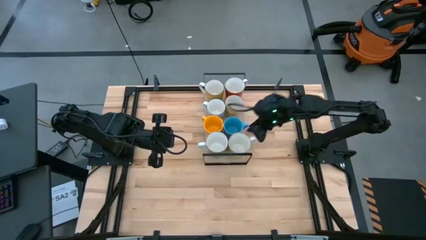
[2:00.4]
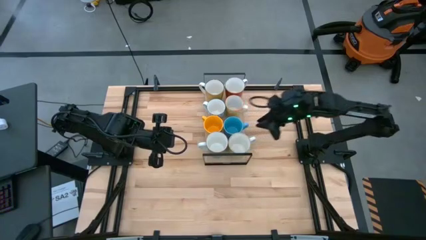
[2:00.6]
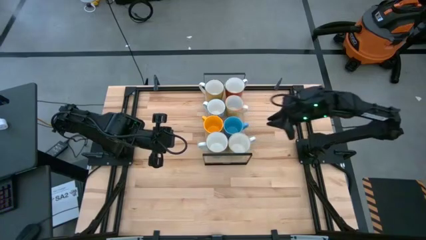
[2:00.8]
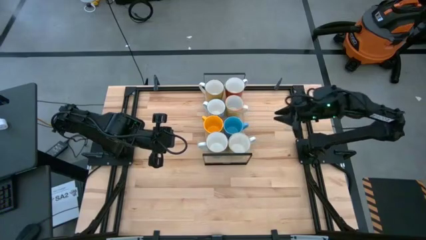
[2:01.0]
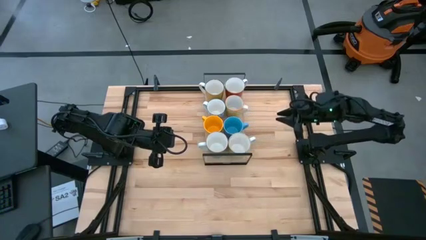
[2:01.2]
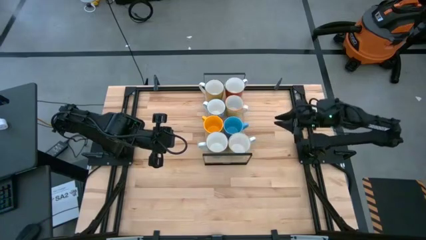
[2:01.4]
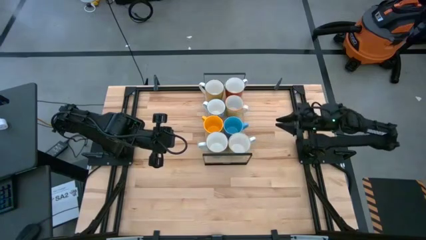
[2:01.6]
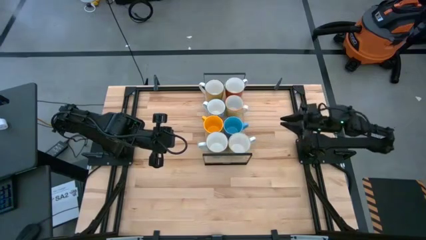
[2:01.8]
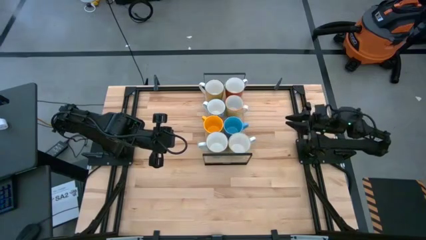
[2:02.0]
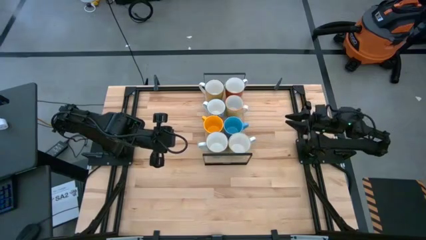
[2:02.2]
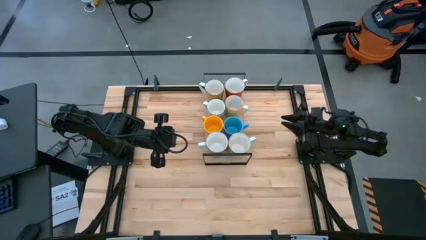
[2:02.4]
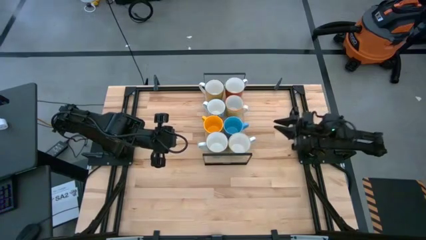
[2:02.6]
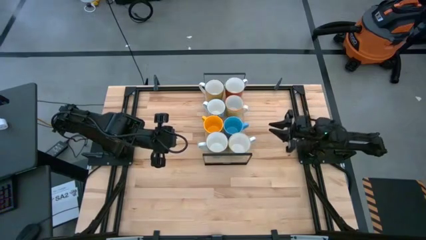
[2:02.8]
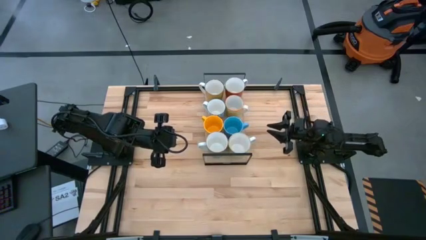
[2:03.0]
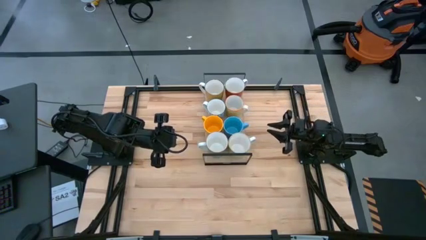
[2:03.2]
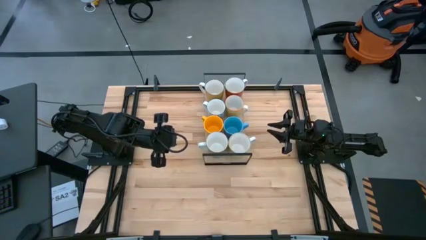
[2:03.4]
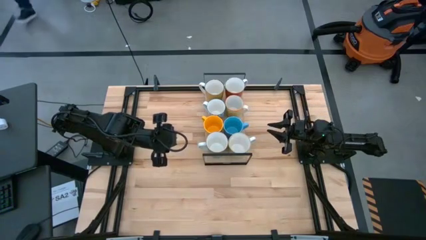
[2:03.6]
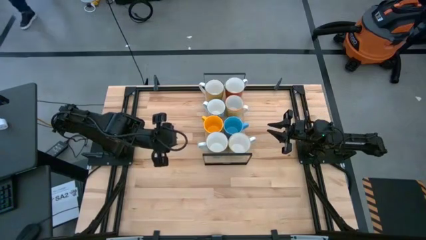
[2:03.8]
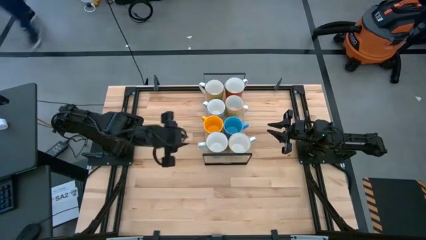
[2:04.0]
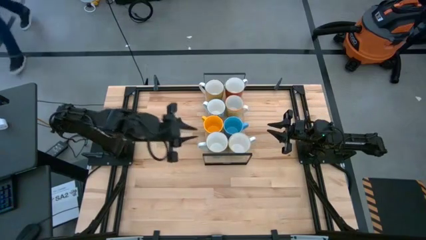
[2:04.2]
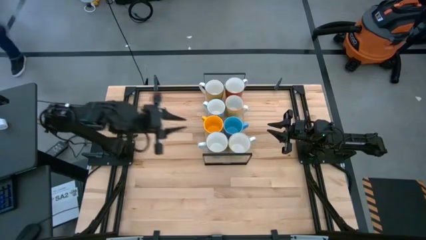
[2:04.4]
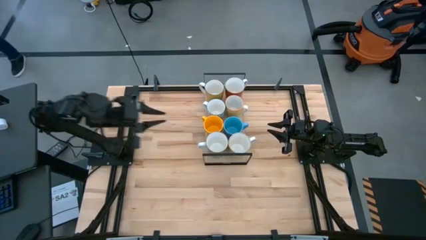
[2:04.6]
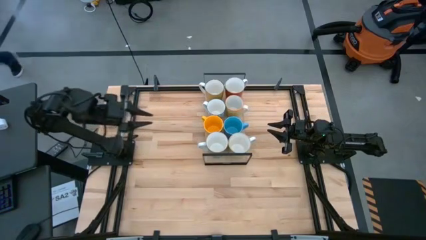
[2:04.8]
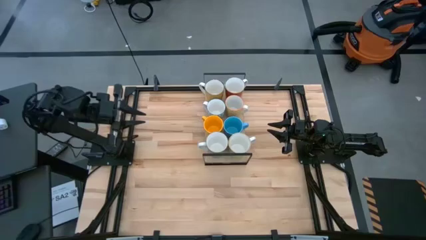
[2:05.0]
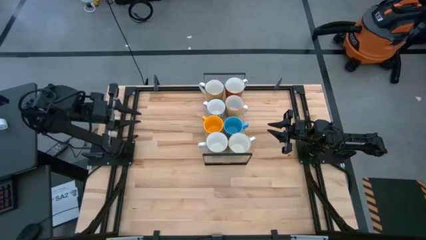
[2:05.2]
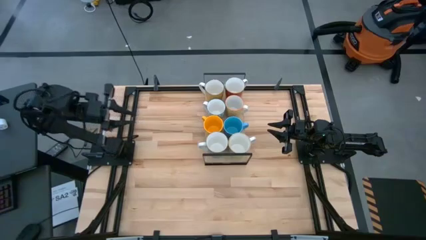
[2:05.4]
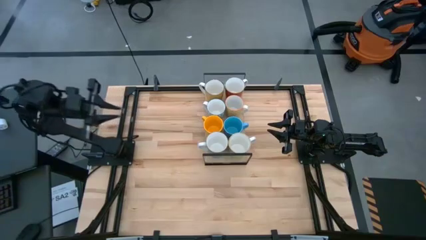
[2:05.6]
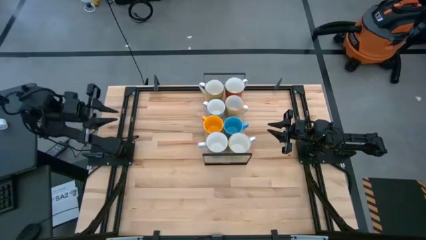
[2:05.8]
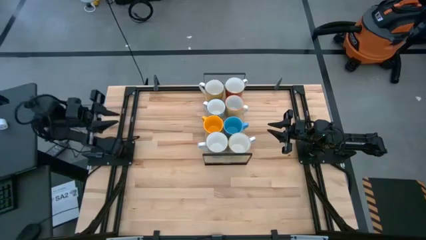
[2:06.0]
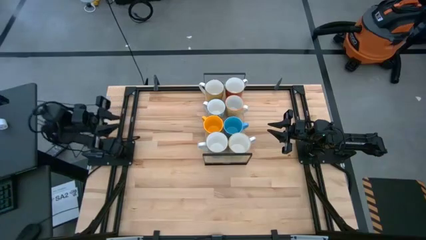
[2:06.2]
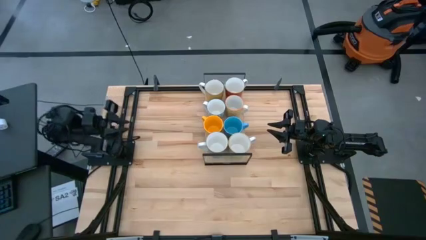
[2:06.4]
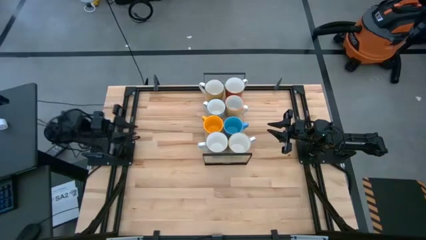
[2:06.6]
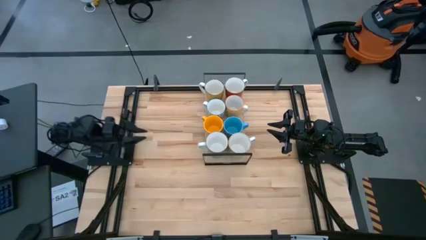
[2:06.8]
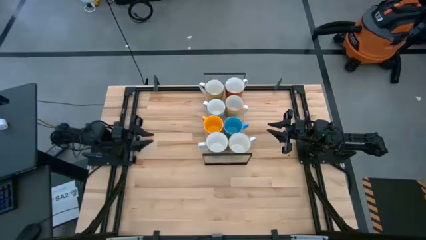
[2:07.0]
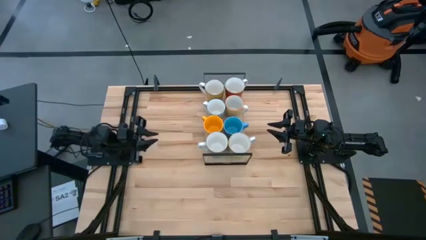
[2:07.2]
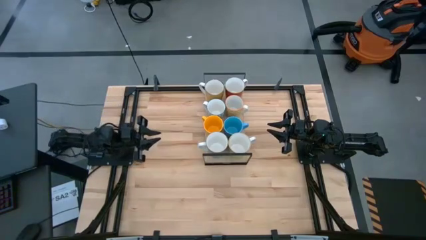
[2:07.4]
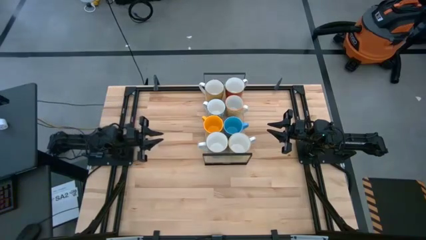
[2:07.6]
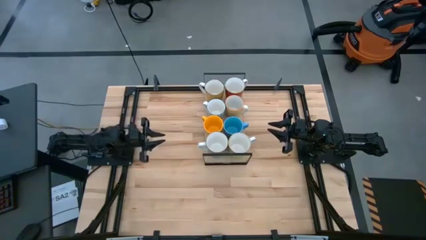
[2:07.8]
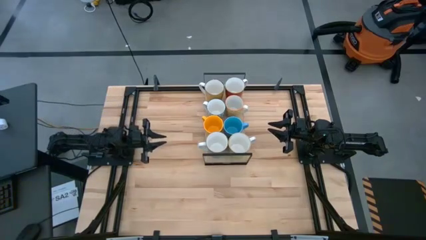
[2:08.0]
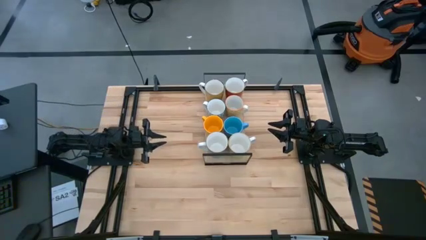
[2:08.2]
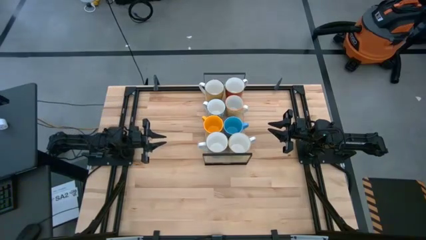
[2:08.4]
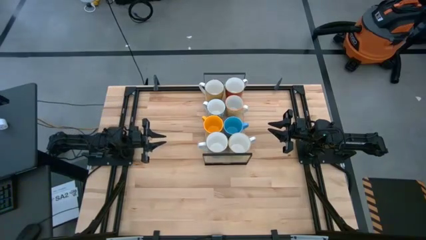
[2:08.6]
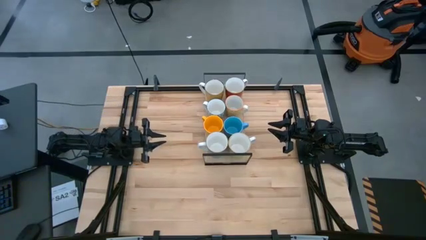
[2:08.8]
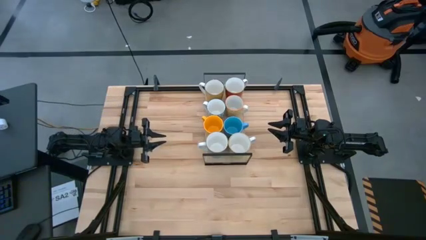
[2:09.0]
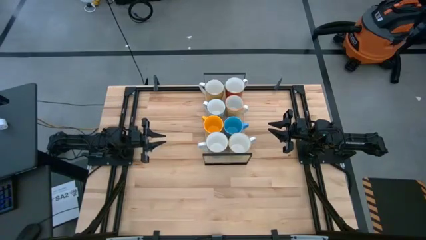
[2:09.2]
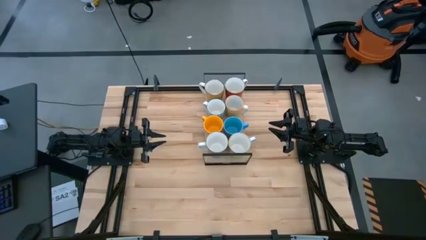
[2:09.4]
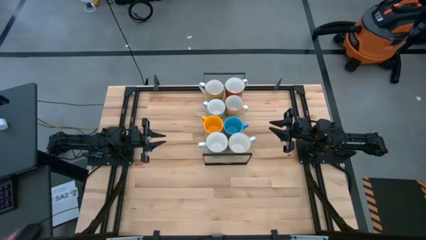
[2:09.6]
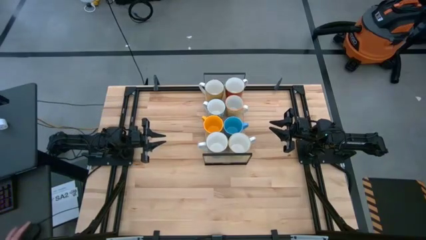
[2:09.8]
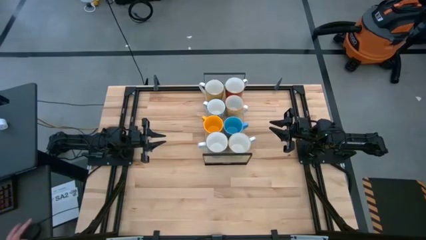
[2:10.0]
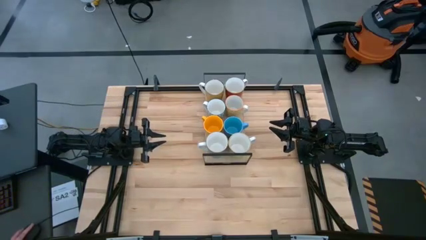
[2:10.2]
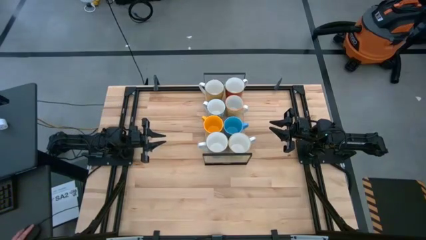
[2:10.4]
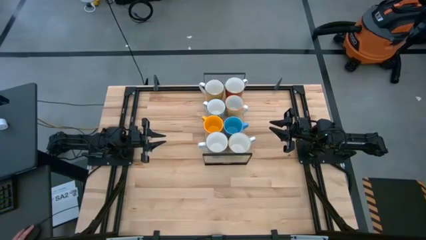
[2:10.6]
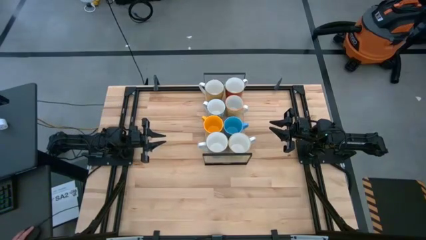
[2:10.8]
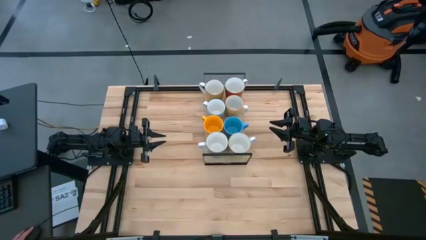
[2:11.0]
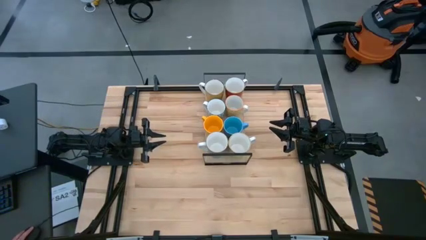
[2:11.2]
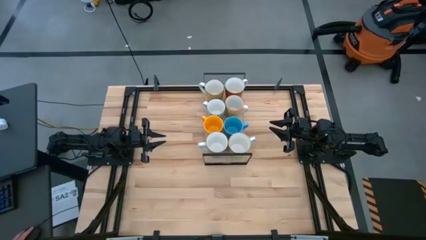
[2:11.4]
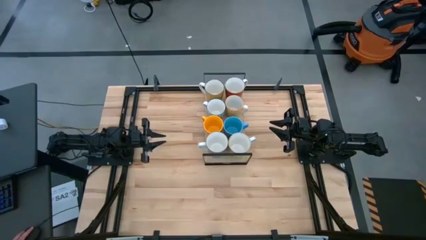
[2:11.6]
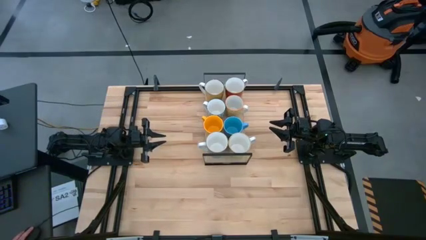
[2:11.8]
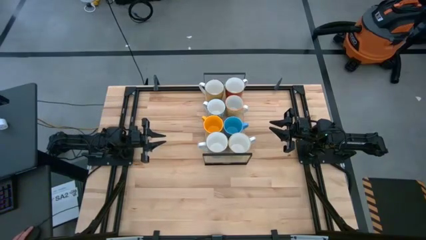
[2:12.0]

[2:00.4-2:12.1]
Task: Place coffee mugs
Return to Home Position
